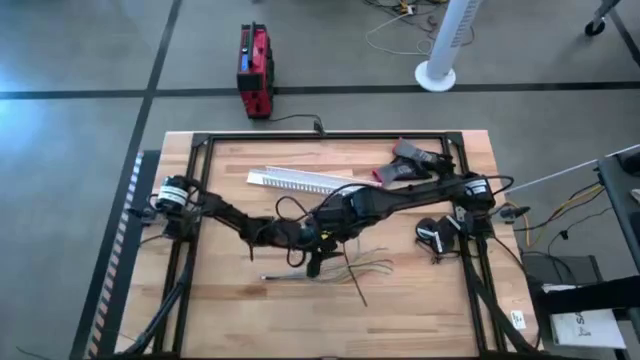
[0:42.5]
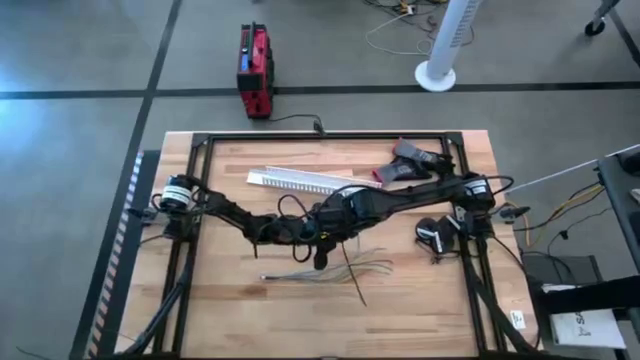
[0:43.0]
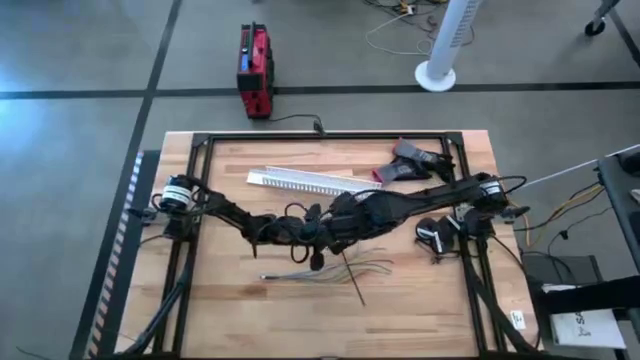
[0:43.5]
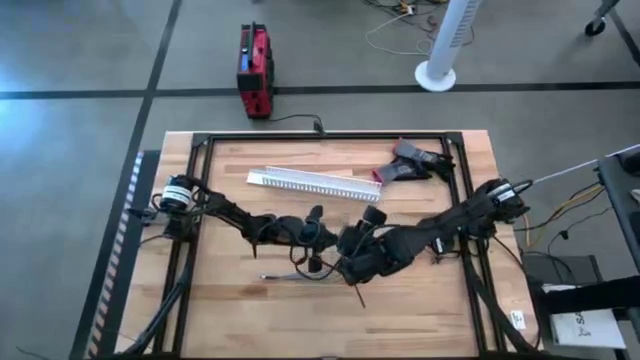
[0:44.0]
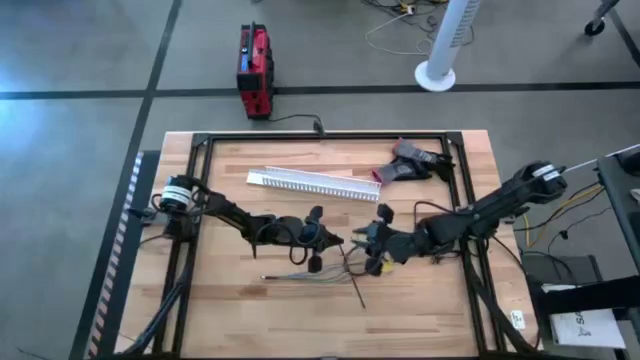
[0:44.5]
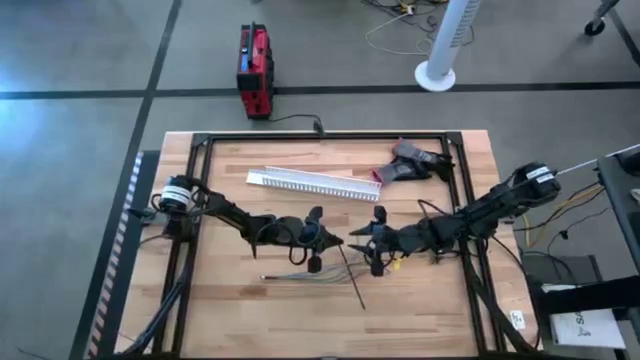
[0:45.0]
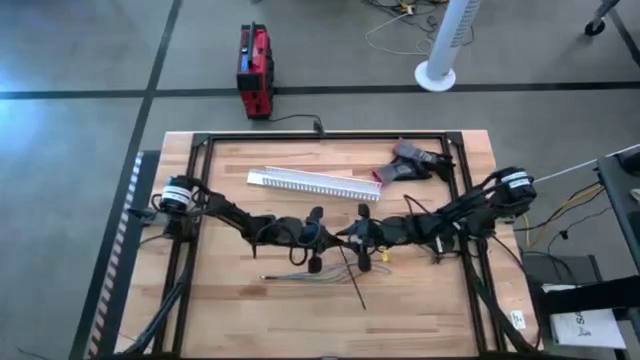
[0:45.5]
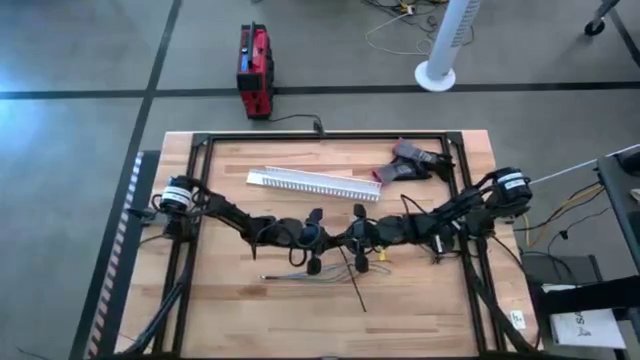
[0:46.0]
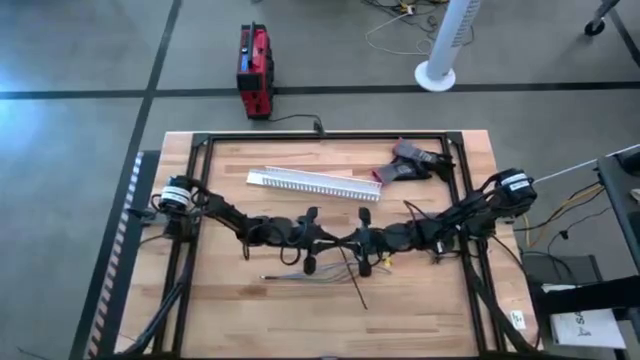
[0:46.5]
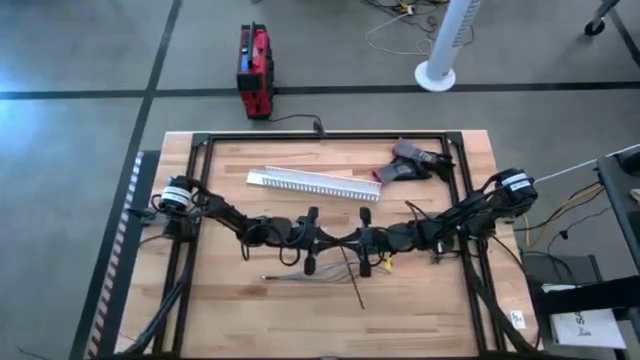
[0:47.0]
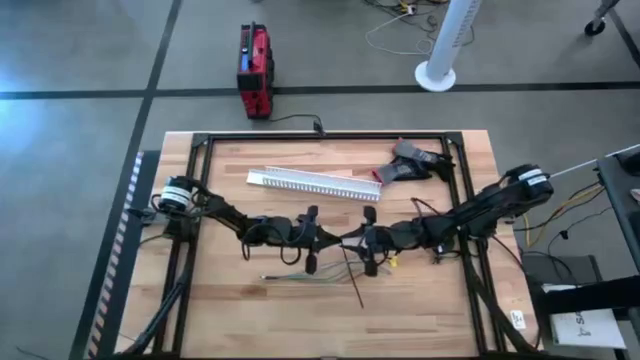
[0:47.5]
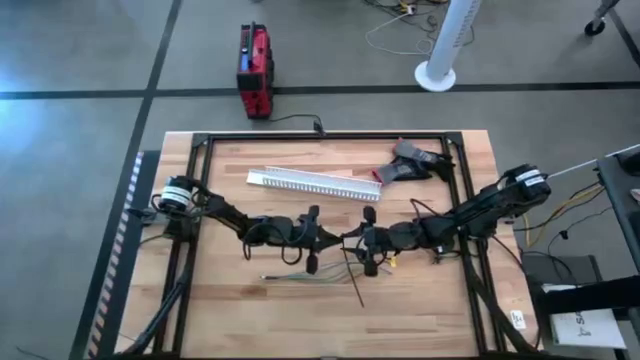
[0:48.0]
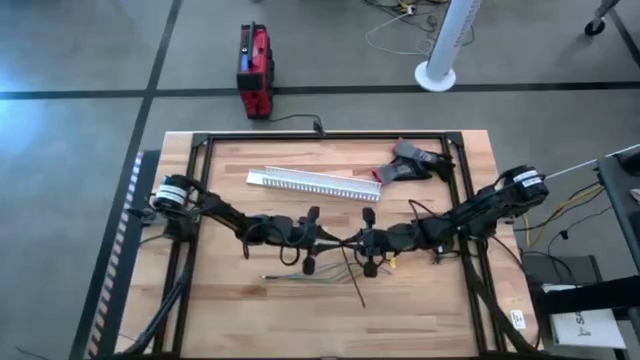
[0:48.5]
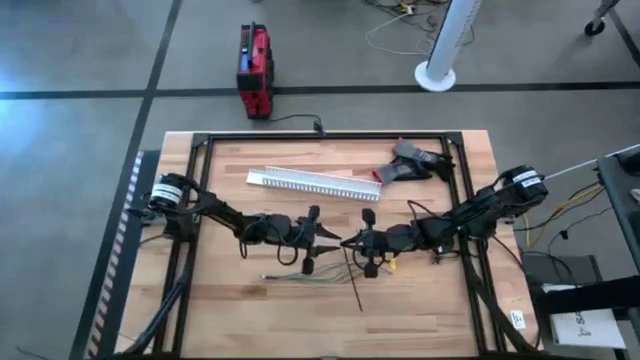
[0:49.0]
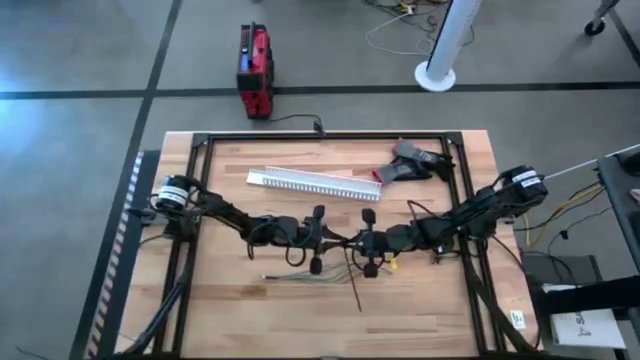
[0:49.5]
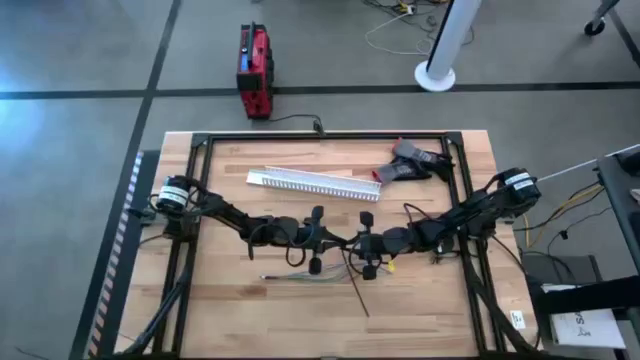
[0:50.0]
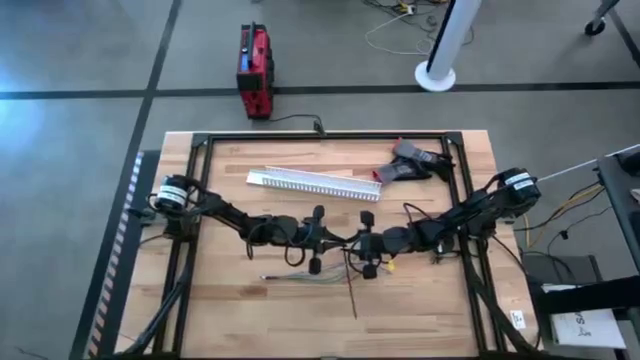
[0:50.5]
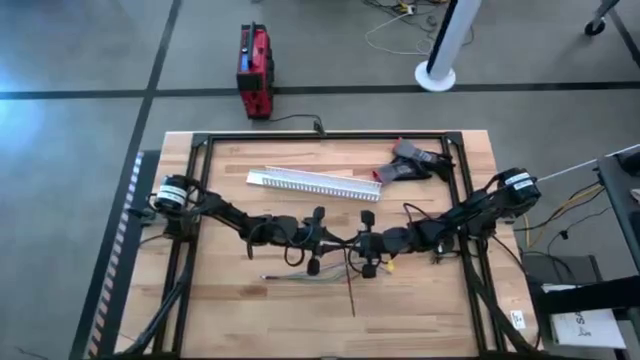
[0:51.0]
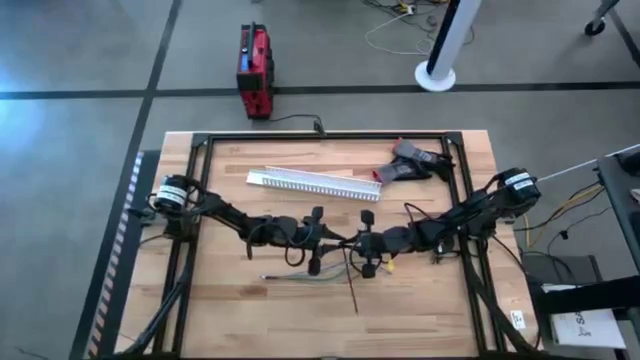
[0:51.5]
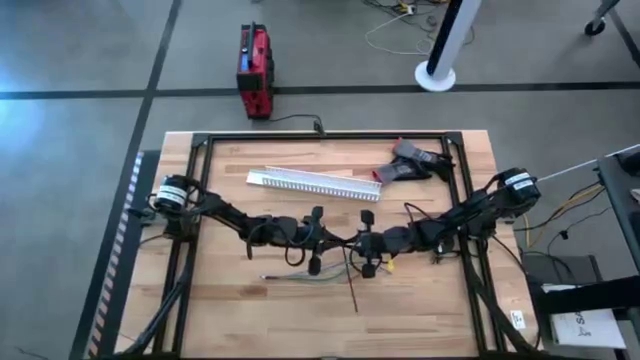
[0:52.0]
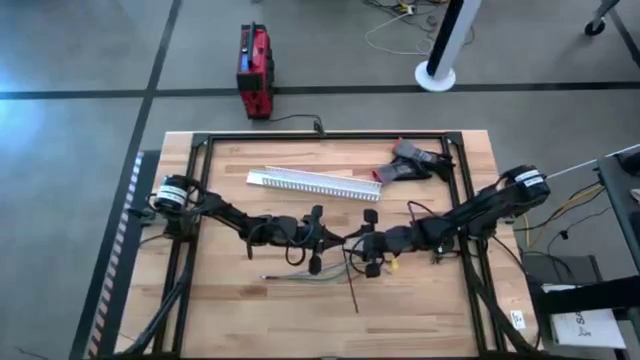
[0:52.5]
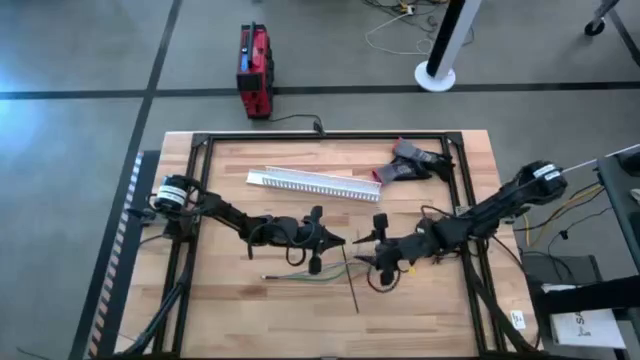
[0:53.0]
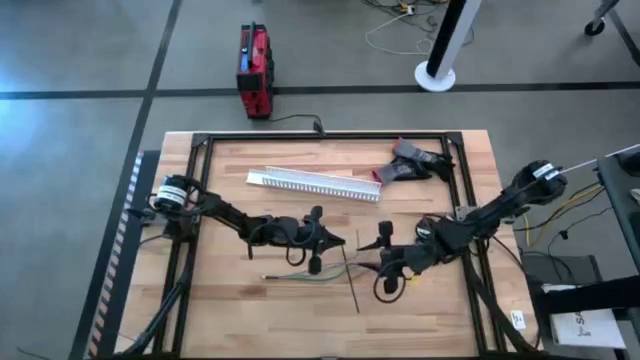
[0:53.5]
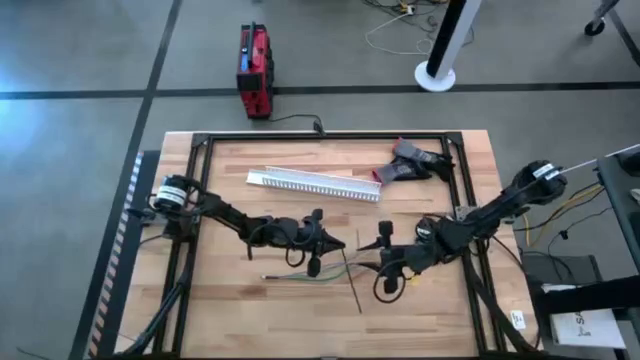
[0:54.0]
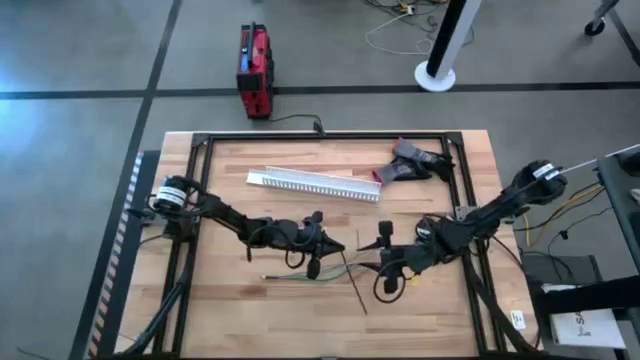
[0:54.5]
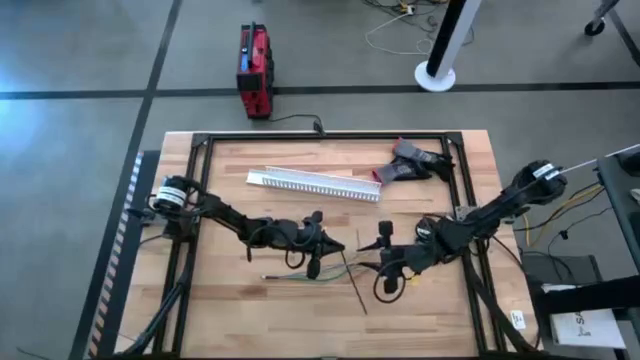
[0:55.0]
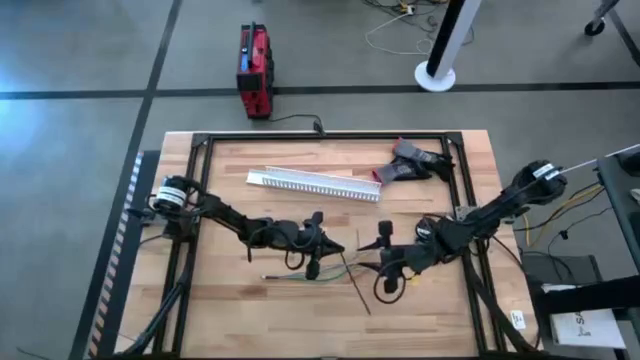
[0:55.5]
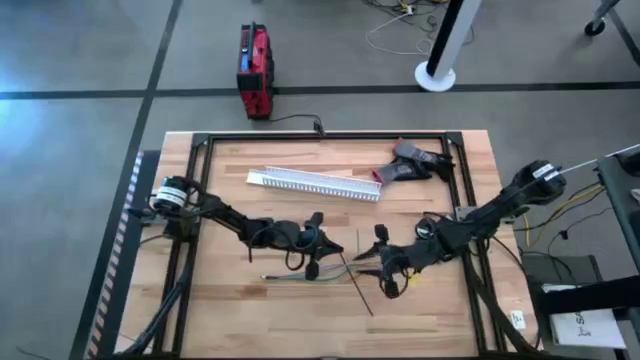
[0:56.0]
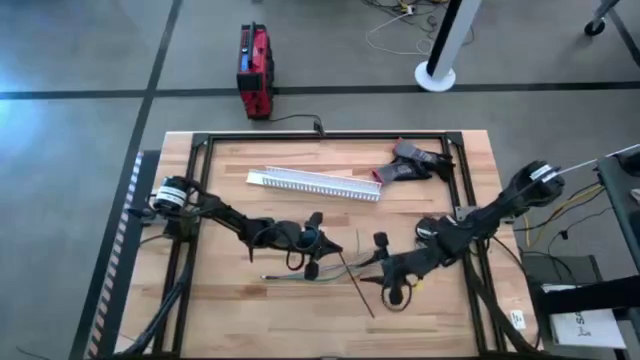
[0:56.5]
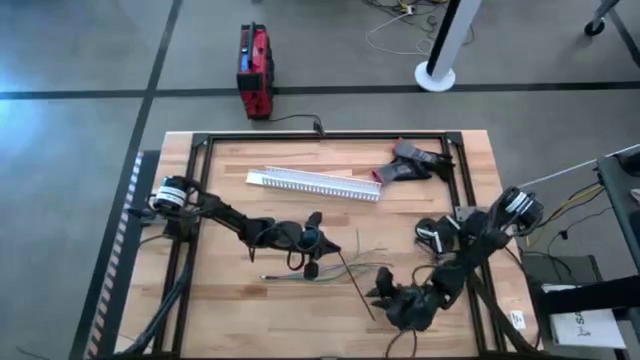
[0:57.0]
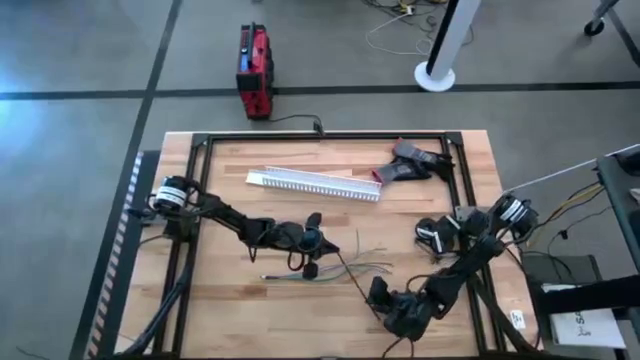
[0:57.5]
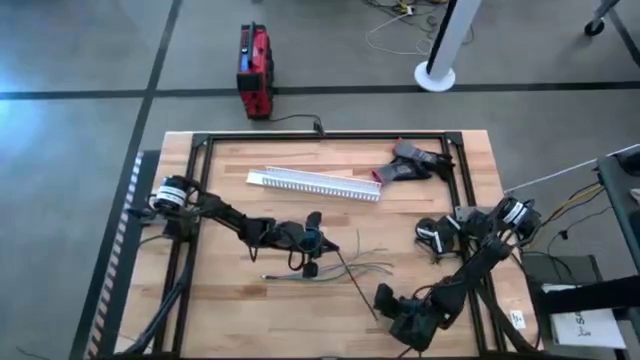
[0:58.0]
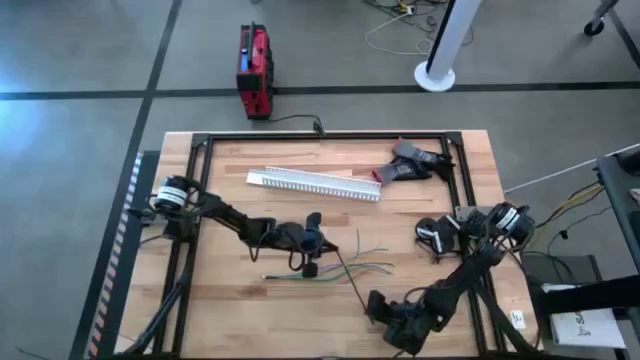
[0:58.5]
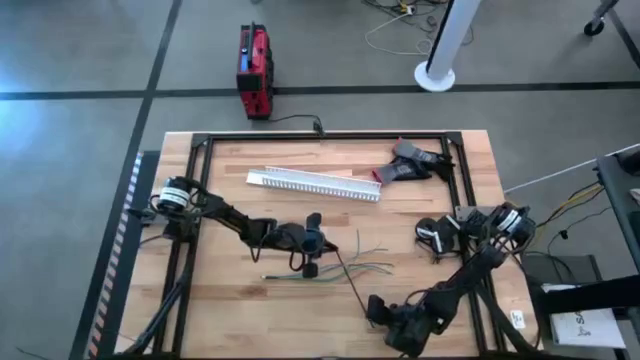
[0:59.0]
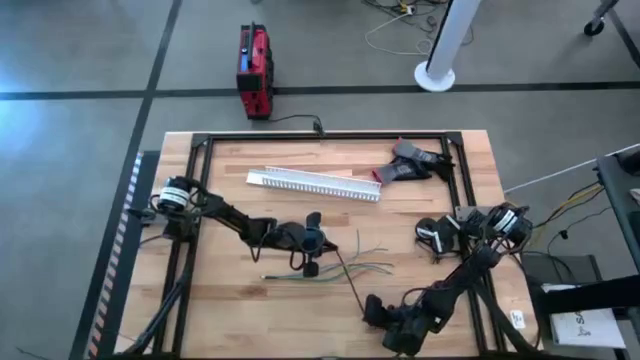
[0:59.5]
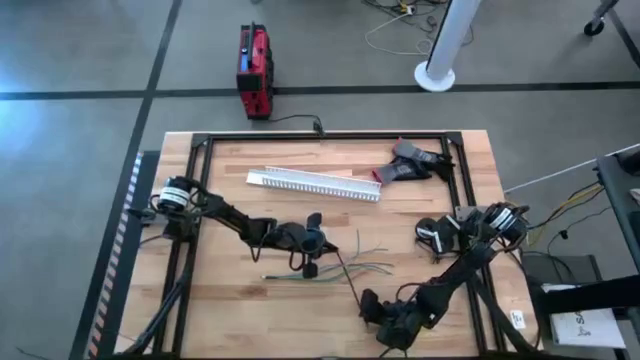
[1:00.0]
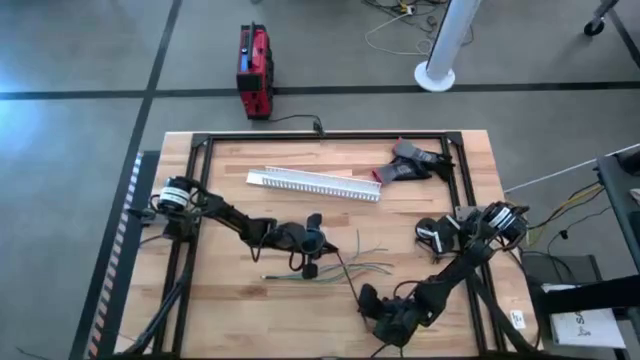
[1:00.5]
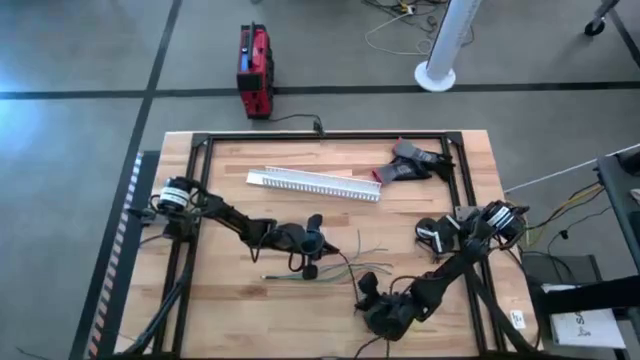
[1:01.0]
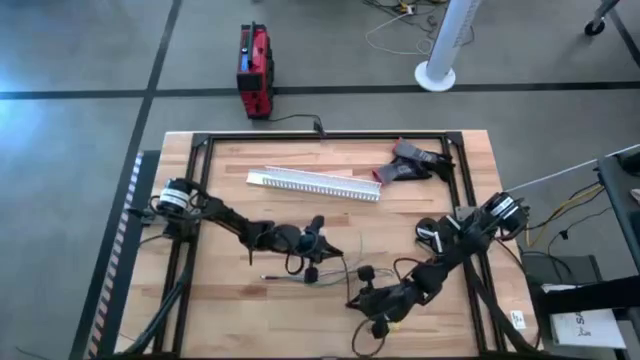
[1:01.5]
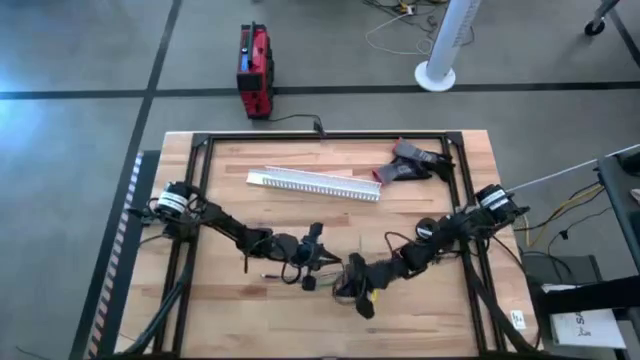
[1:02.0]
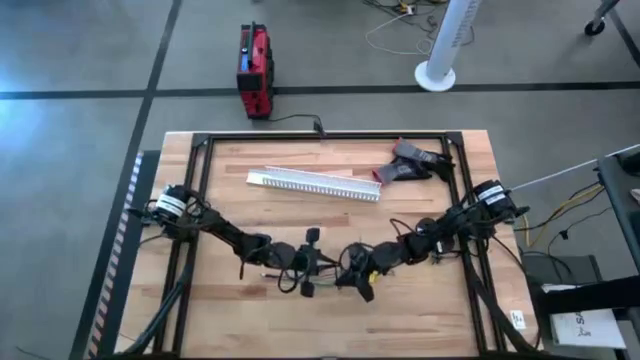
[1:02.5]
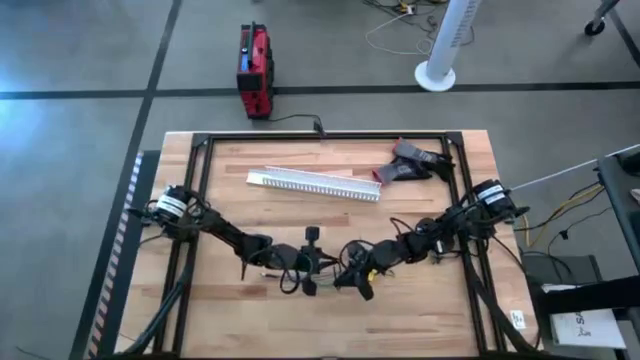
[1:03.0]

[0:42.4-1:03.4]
Task: Ziptie cables
Insert the black ziptie on the cable wires
